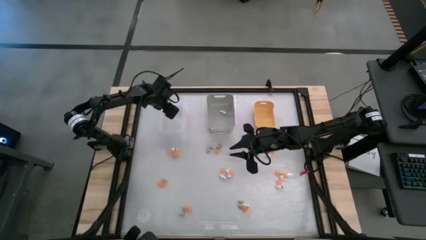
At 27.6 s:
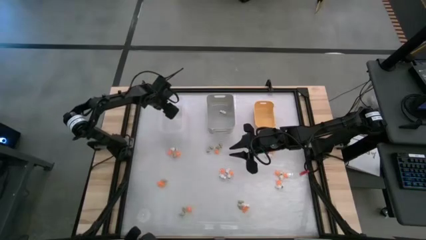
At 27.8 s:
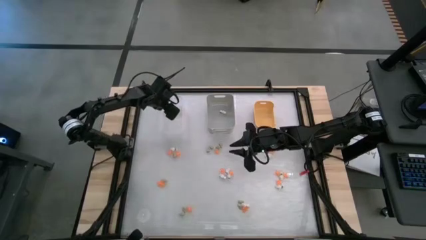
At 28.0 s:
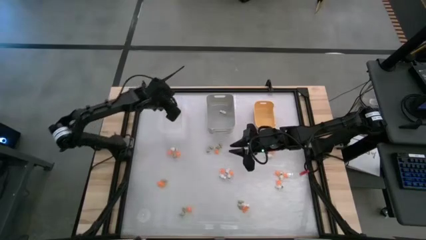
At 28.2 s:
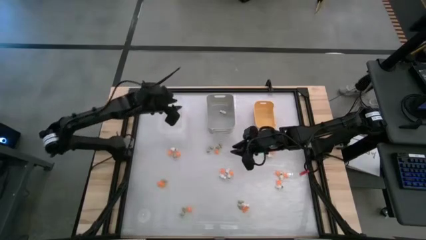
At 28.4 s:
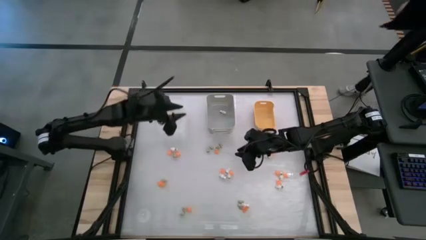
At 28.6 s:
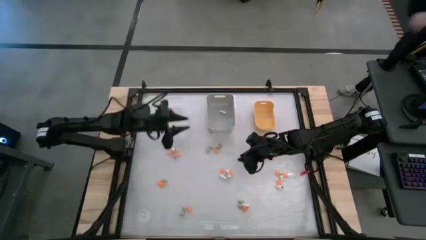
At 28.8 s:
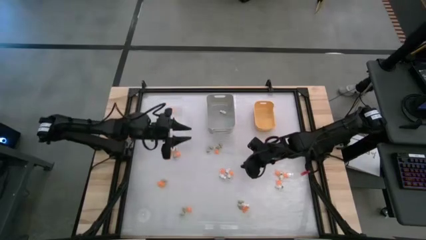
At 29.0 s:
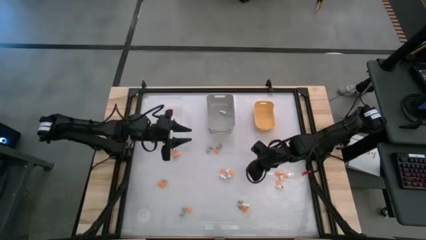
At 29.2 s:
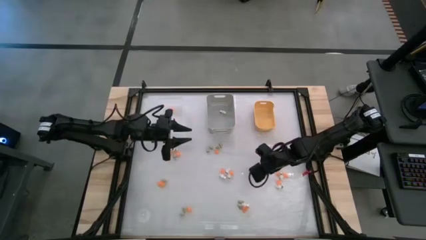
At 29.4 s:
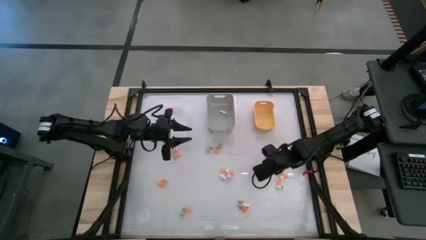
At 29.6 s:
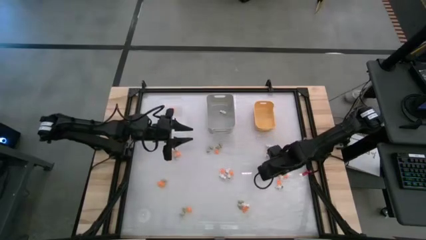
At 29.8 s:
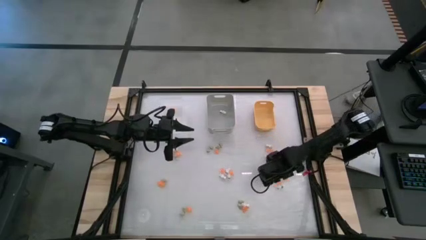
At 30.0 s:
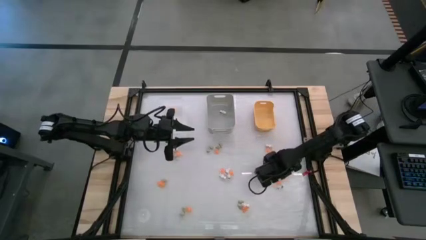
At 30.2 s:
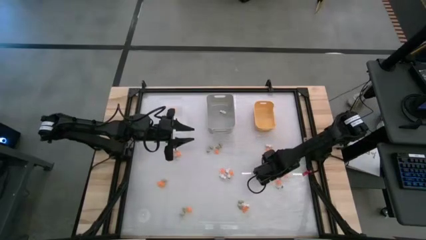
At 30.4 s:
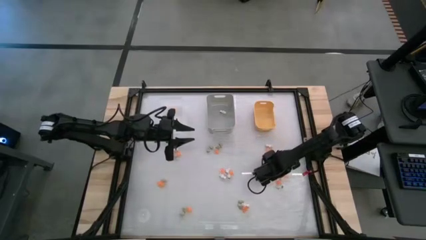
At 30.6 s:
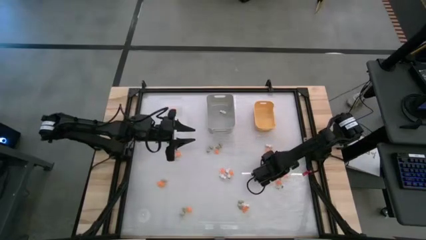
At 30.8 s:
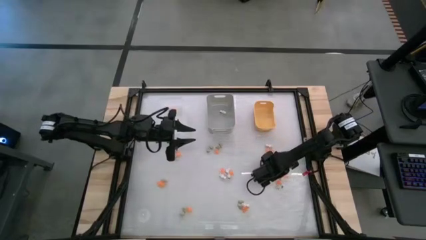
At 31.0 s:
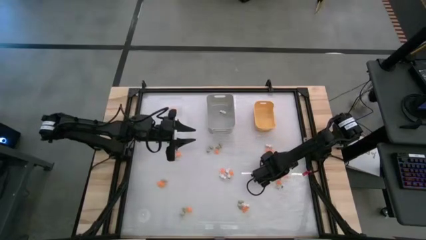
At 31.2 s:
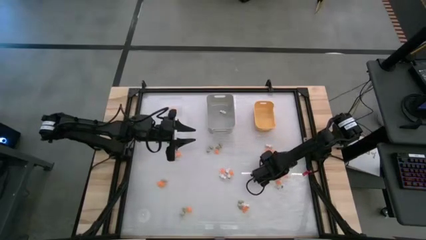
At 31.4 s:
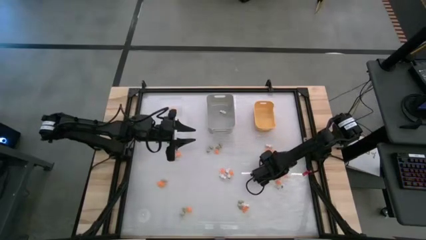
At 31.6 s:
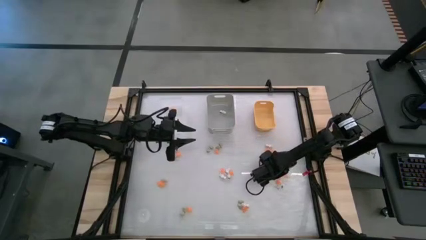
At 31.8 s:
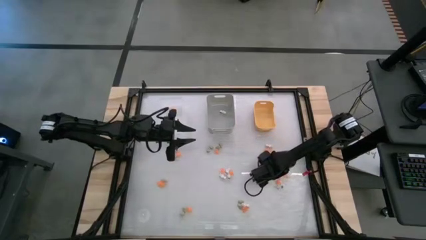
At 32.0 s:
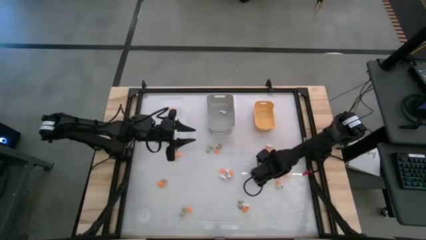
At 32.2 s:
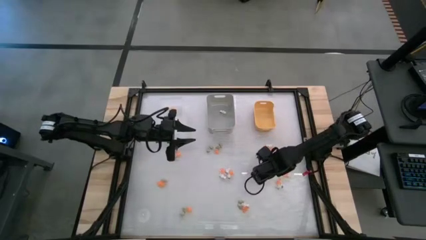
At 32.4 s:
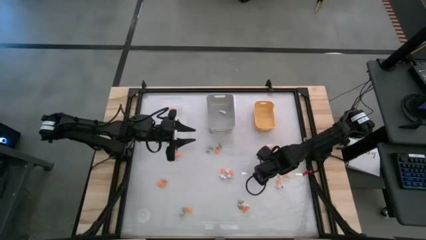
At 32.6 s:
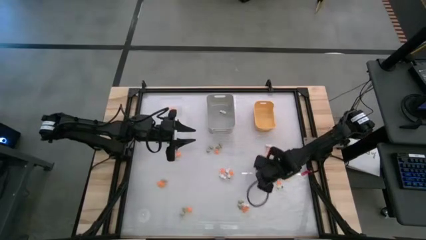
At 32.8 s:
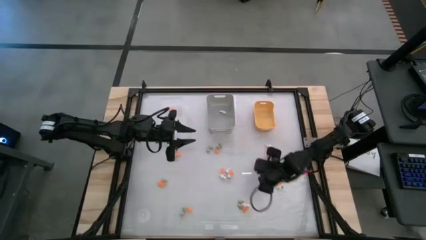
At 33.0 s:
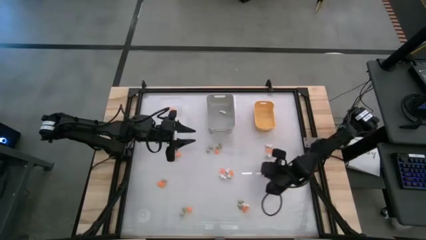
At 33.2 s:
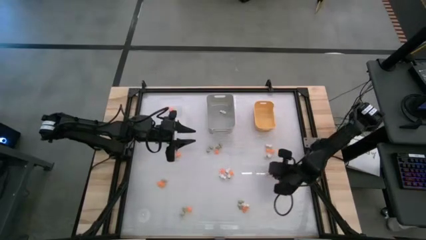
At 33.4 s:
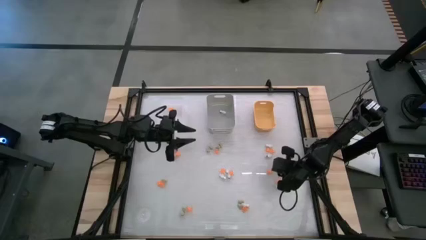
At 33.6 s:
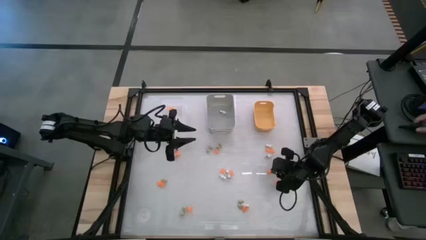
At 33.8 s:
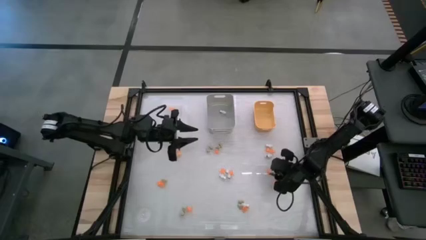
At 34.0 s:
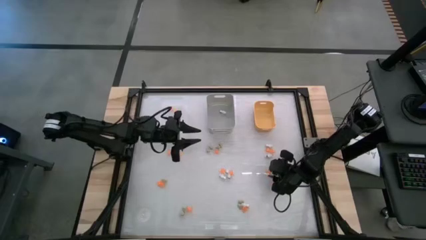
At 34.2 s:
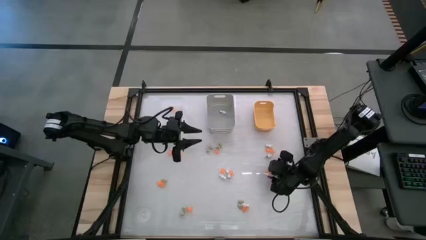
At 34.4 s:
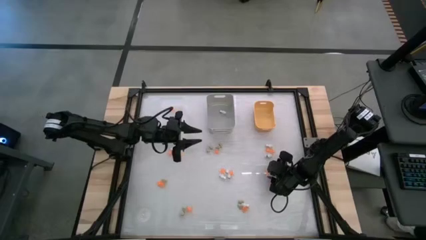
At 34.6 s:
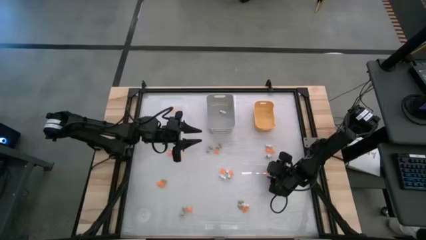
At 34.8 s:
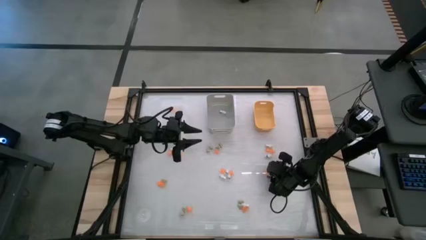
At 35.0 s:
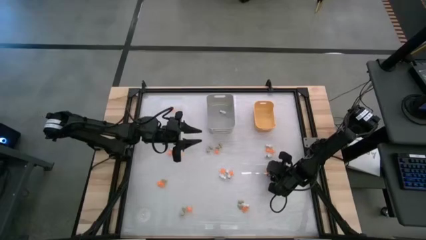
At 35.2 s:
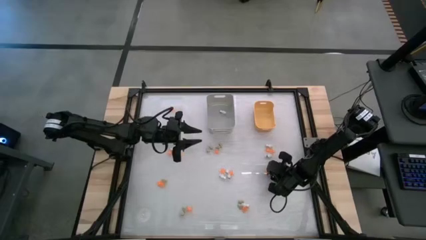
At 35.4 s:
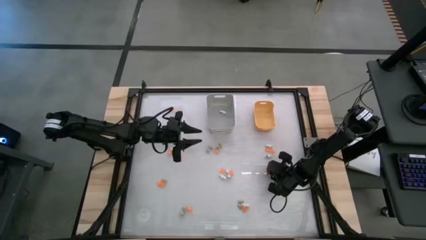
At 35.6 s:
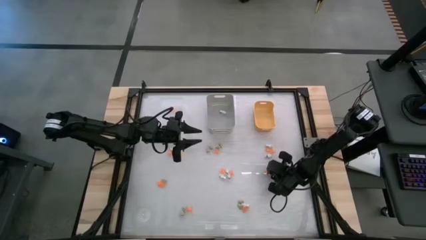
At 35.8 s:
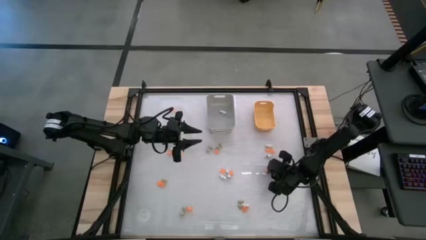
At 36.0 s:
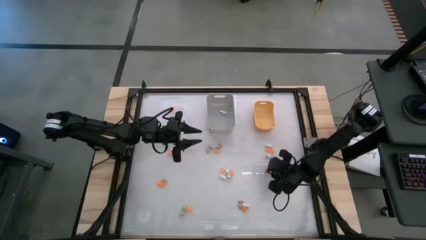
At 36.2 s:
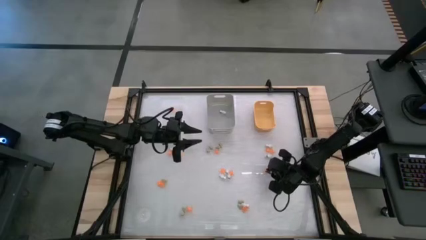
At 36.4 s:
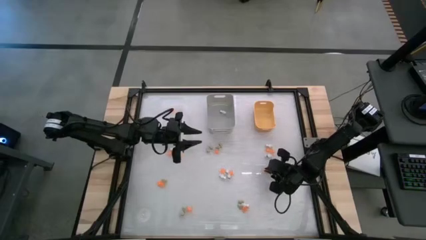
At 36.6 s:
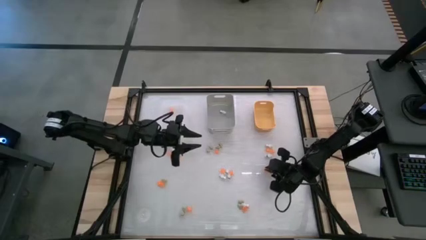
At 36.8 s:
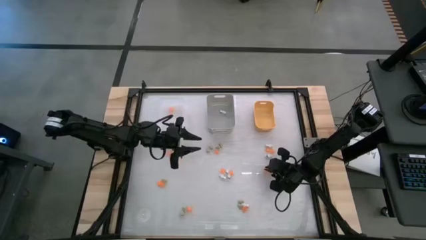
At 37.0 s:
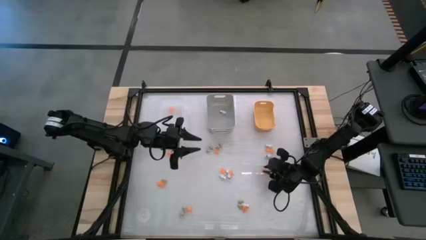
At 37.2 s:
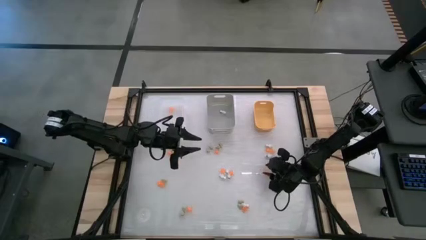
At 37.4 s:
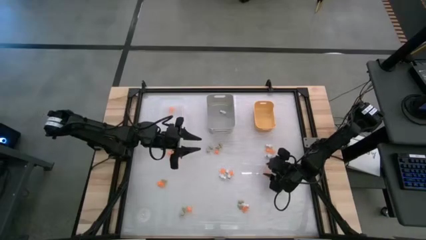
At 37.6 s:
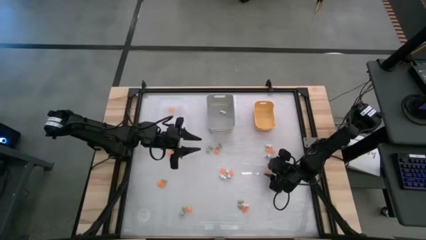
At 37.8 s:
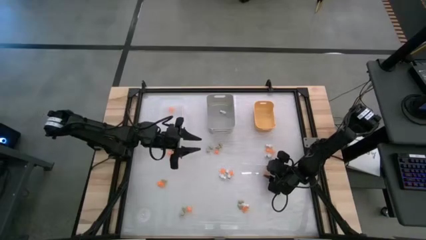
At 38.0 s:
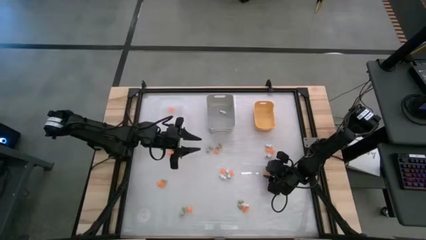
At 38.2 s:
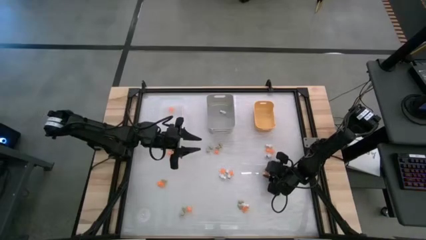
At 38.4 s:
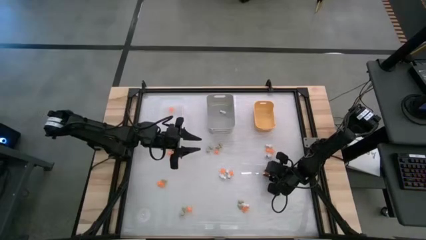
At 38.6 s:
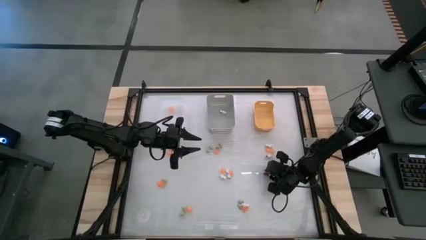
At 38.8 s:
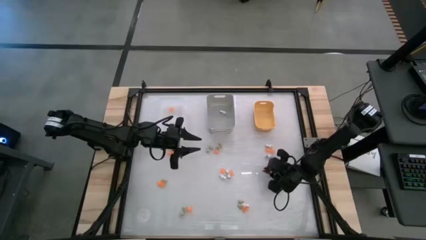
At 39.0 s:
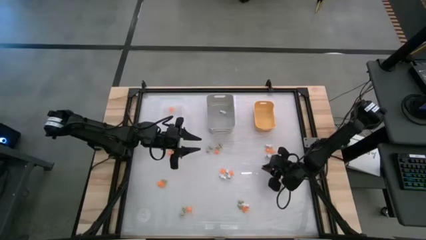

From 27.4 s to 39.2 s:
Task: Sort Halloween decoration
Put the orange spider toy into the transparent white bin

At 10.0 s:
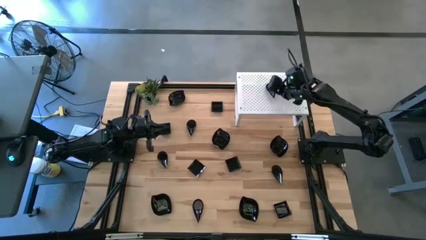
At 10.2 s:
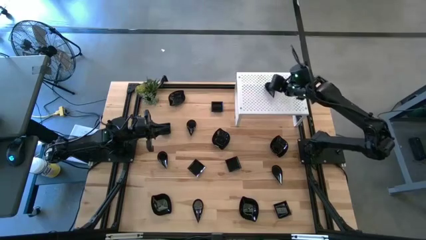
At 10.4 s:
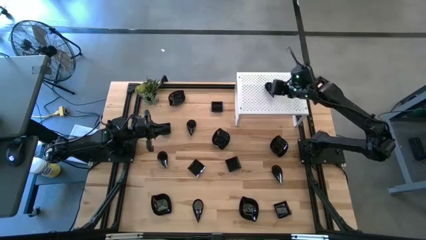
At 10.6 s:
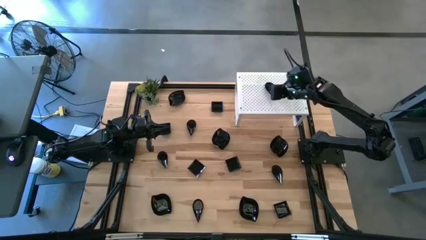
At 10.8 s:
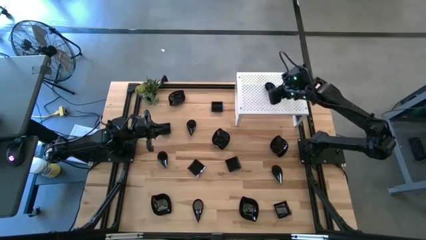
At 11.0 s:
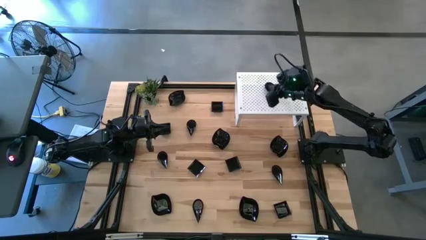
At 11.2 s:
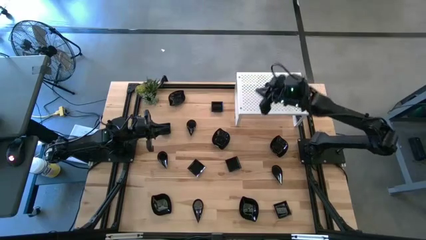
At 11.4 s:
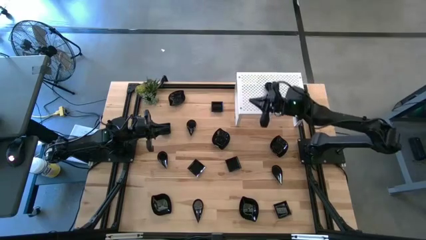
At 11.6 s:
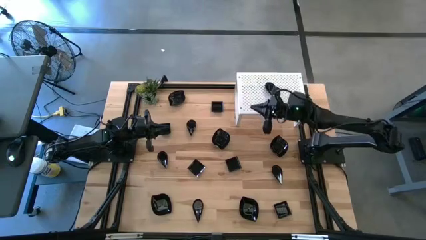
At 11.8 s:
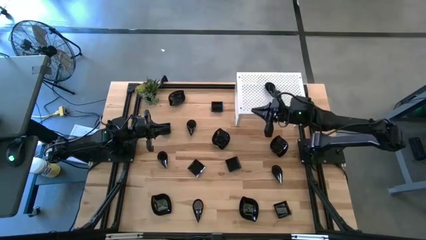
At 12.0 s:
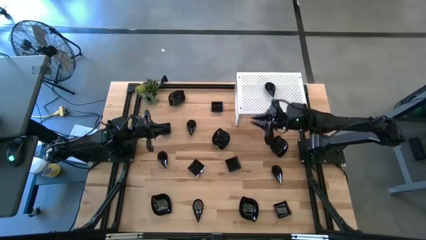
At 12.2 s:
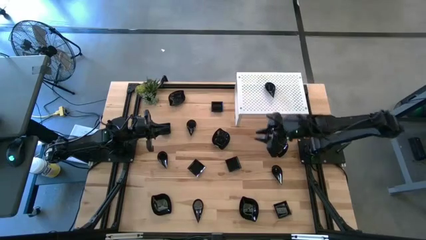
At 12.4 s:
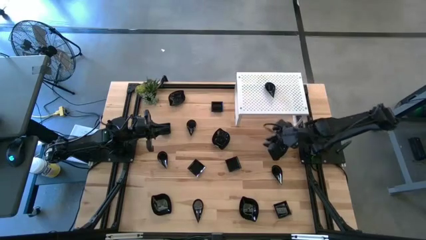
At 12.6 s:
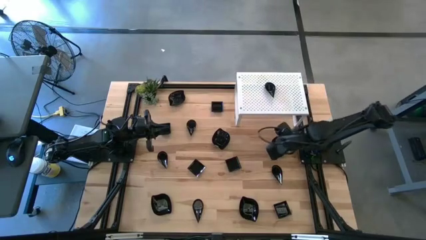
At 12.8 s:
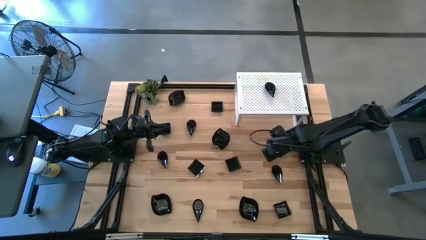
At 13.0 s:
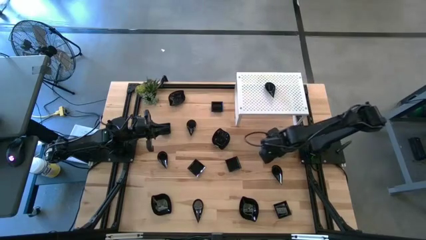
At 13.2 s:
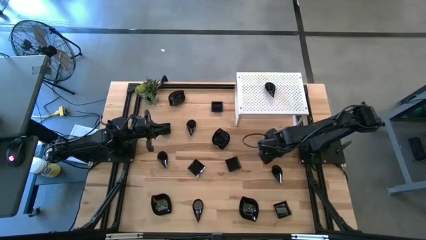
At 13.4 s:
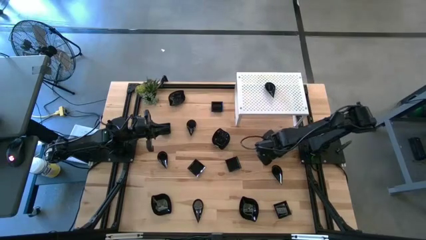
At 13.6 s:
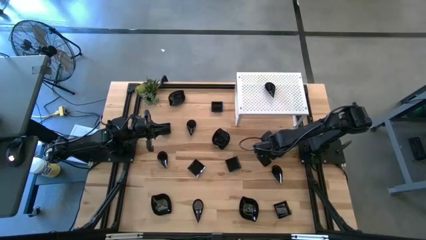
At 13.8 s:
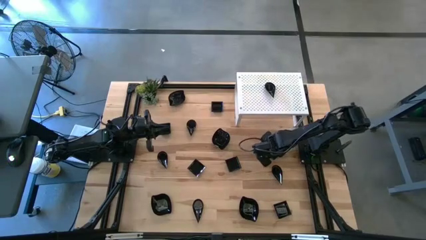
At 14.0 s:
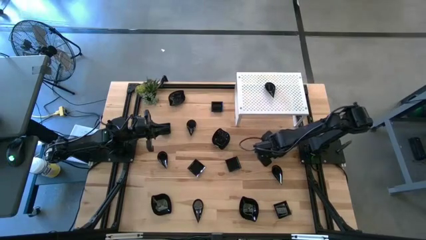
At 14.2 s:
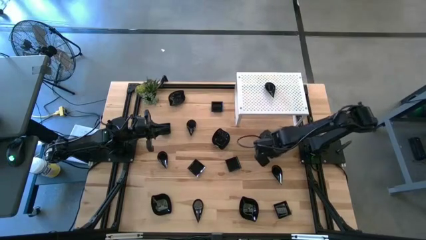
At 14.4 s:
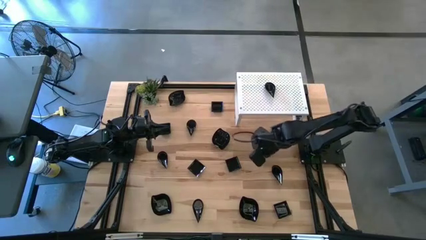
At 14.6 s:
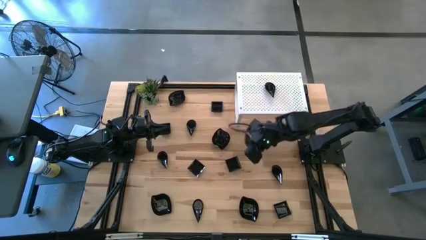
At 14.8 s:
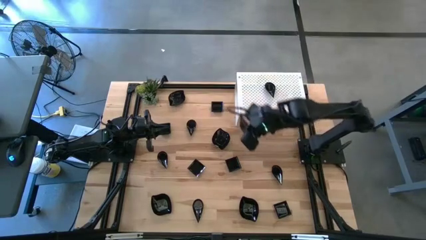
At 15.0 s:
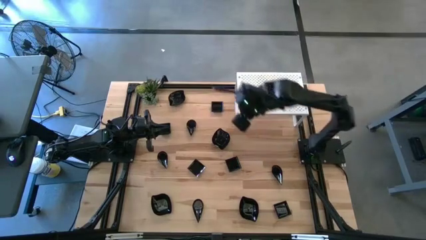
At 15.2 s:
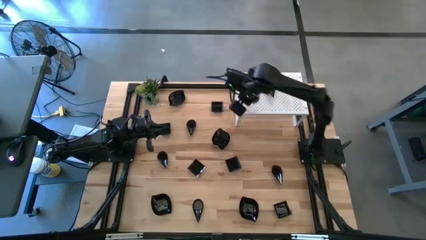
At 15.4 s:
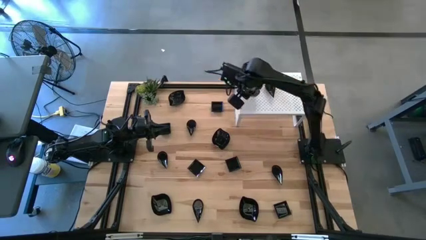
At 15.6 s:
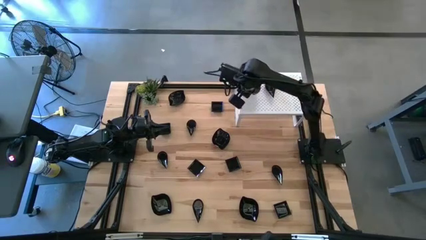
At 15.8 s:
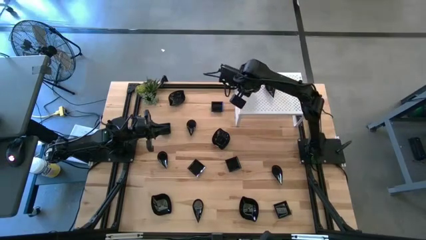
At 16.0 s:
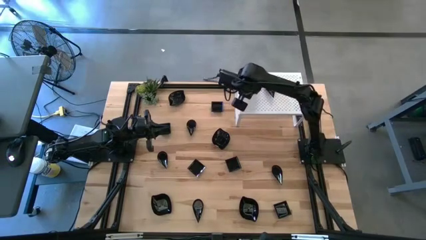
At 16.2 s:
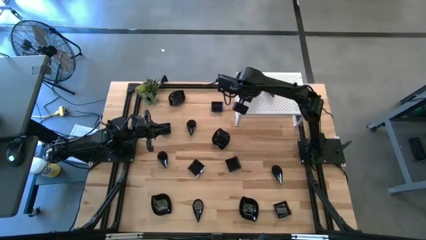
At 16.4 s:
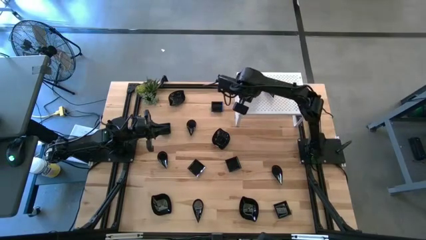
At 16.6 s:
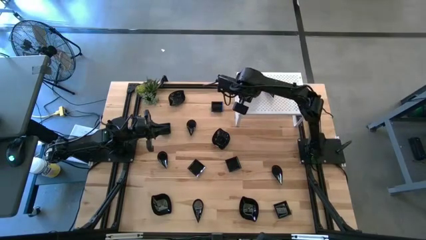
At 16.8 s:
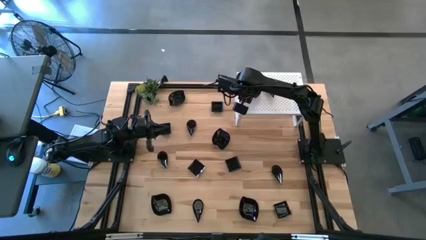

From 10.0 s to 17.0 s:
Task: Pick & Place Mini shaped plates
Put the black leaf-shaped plate on the shelf
